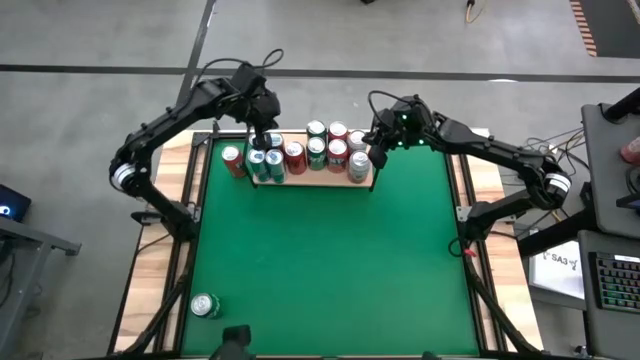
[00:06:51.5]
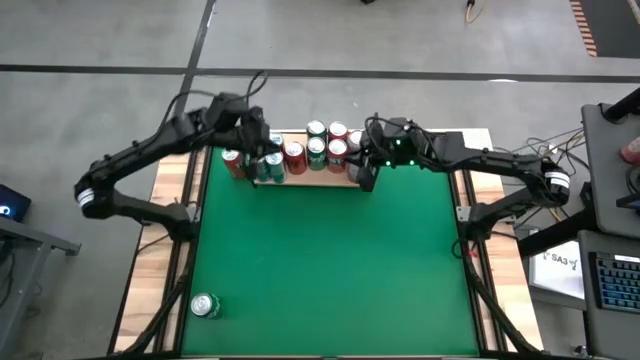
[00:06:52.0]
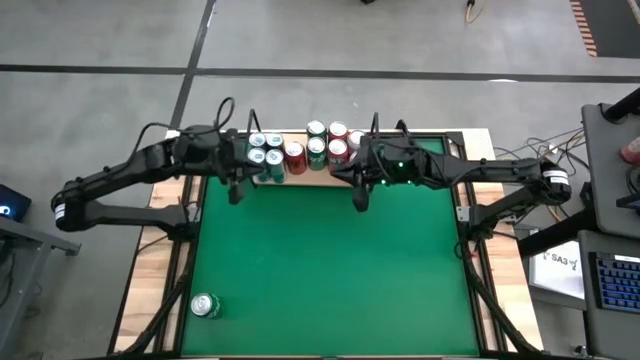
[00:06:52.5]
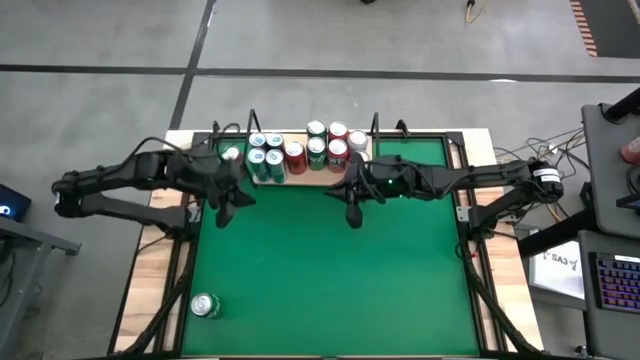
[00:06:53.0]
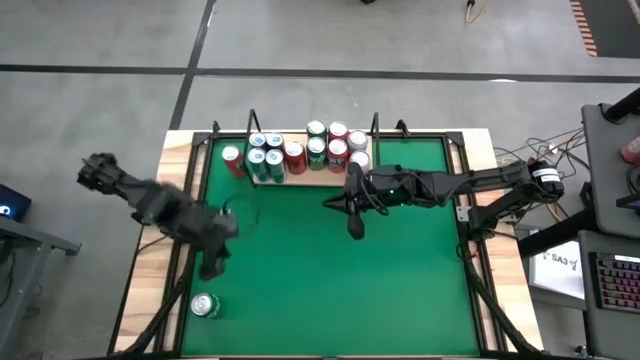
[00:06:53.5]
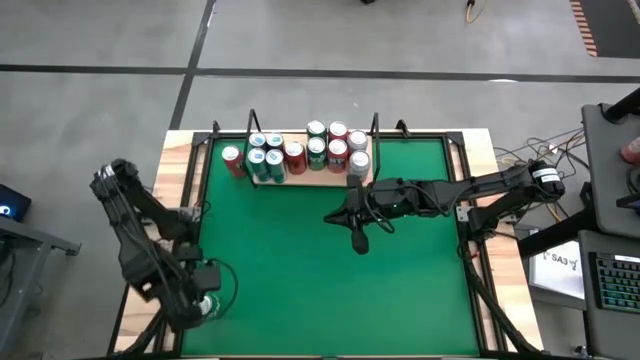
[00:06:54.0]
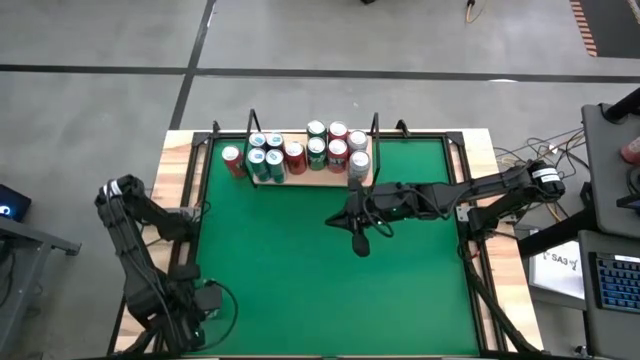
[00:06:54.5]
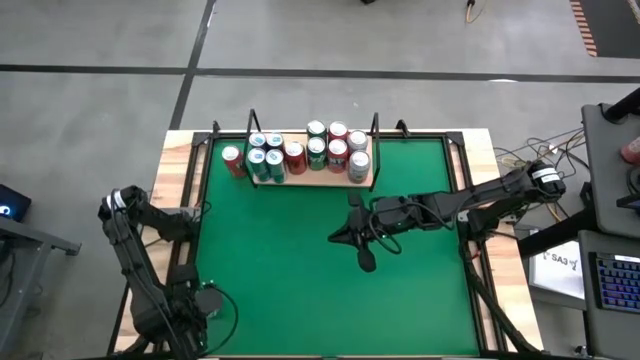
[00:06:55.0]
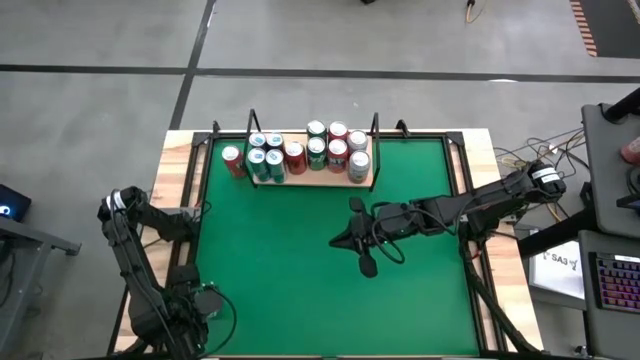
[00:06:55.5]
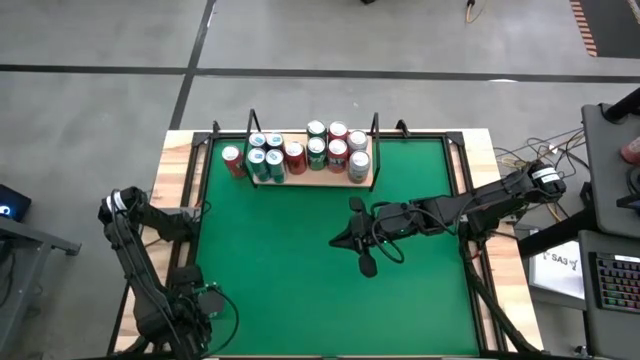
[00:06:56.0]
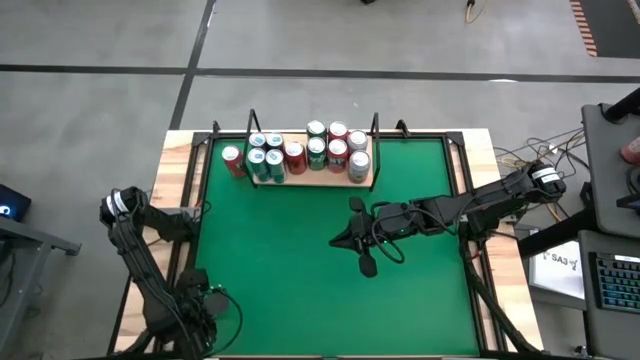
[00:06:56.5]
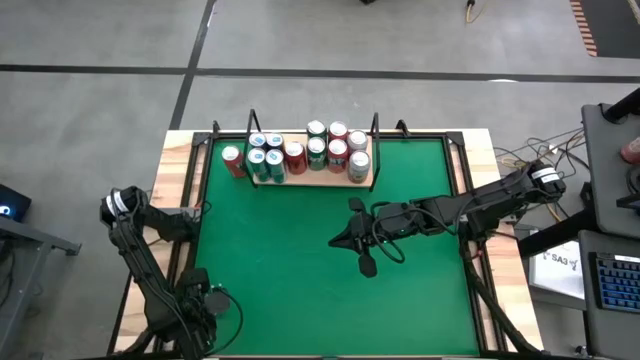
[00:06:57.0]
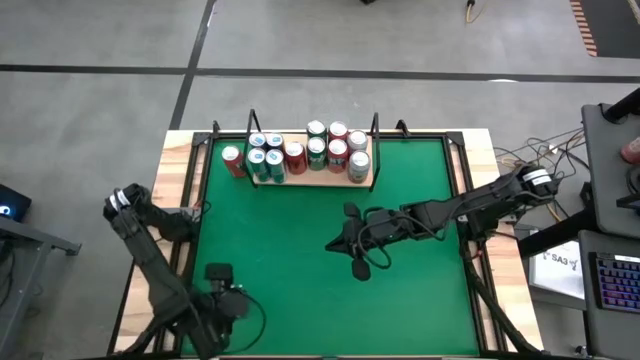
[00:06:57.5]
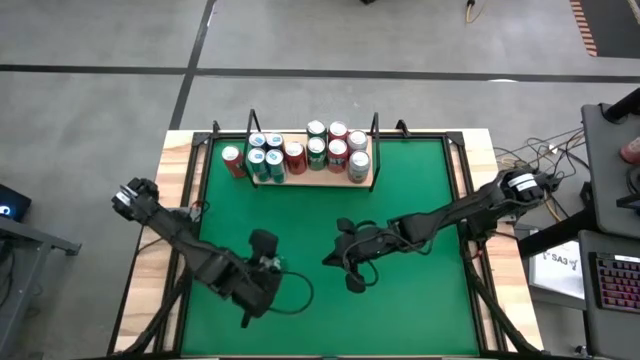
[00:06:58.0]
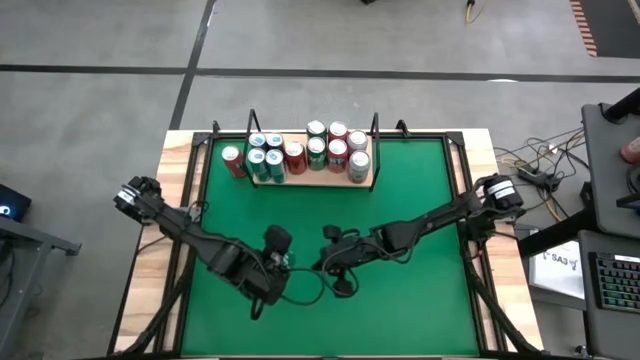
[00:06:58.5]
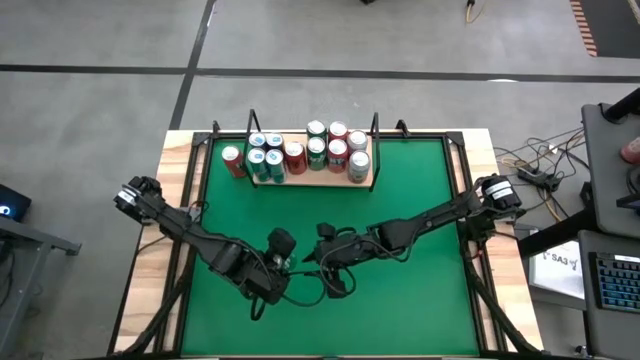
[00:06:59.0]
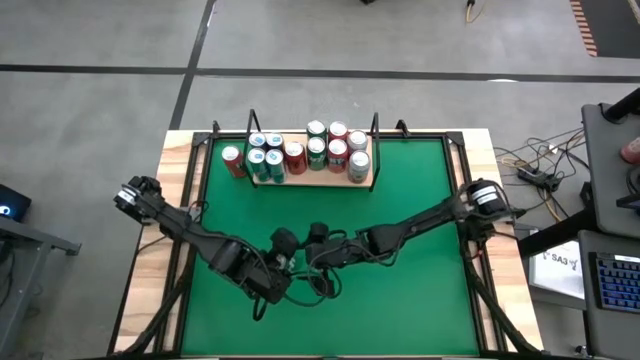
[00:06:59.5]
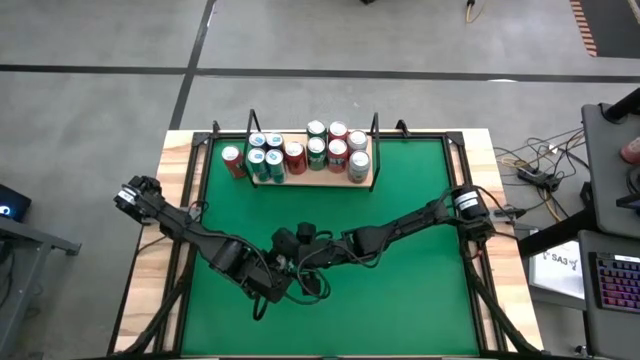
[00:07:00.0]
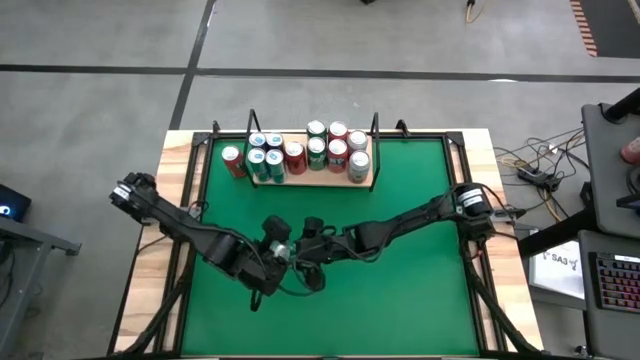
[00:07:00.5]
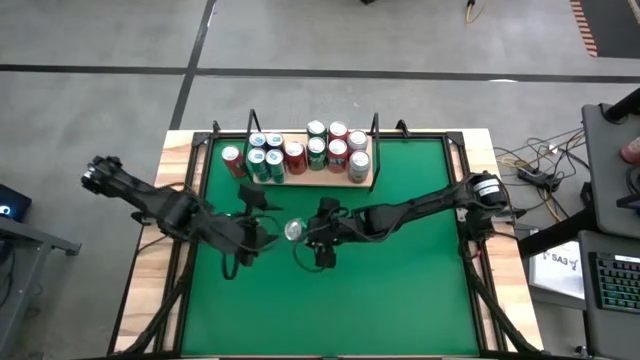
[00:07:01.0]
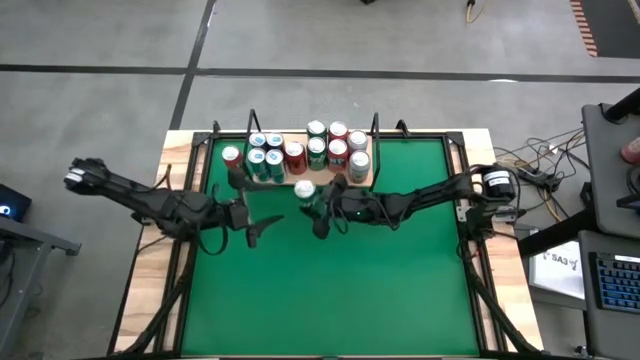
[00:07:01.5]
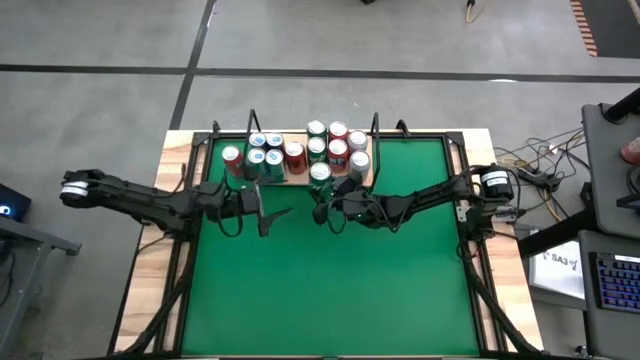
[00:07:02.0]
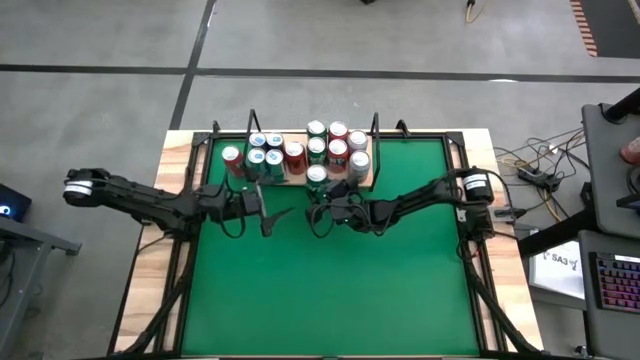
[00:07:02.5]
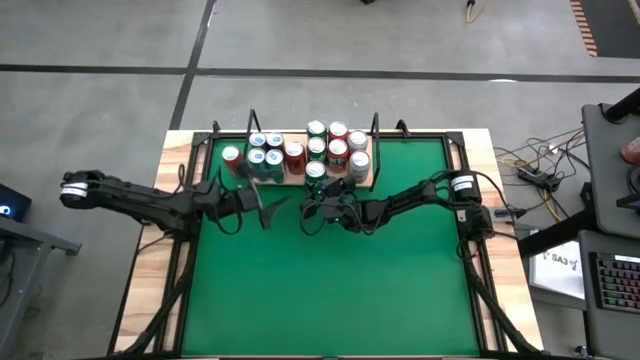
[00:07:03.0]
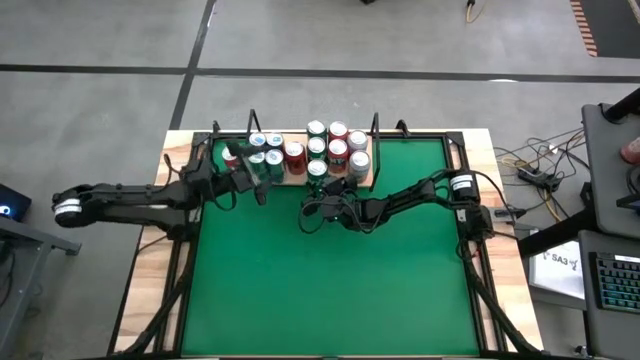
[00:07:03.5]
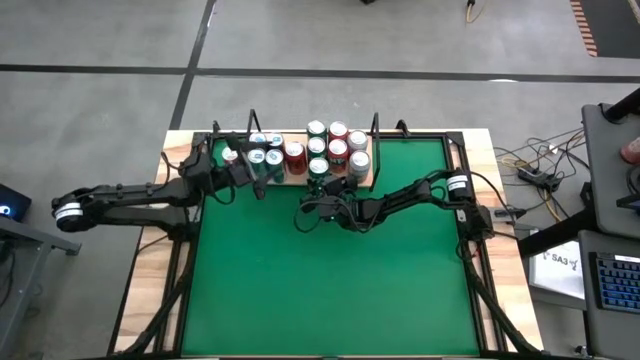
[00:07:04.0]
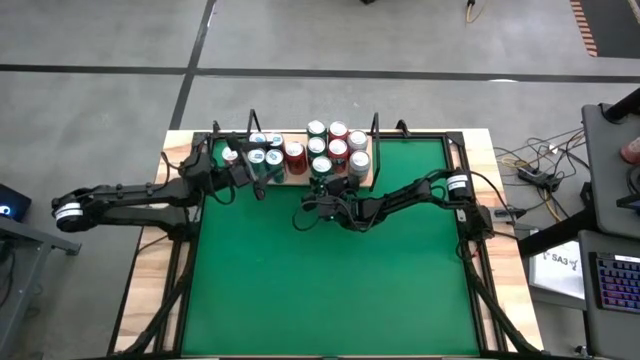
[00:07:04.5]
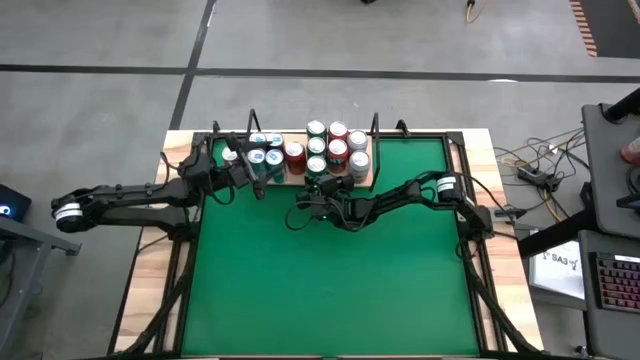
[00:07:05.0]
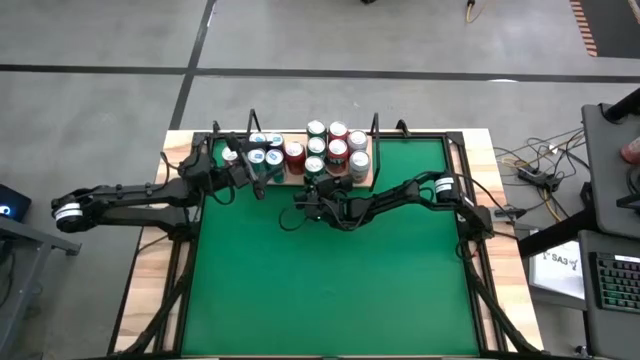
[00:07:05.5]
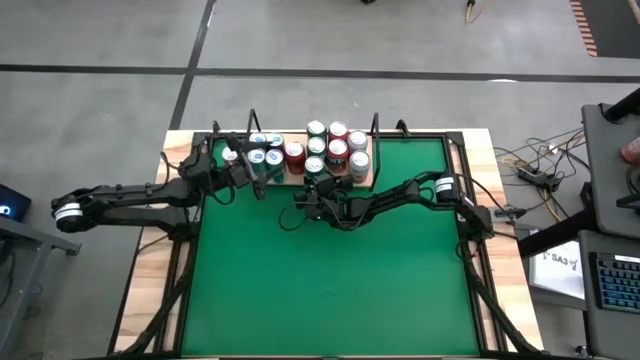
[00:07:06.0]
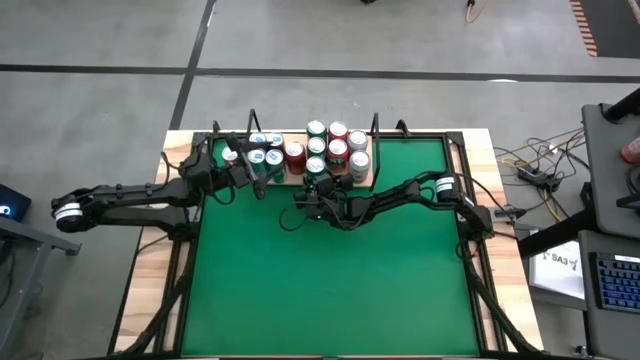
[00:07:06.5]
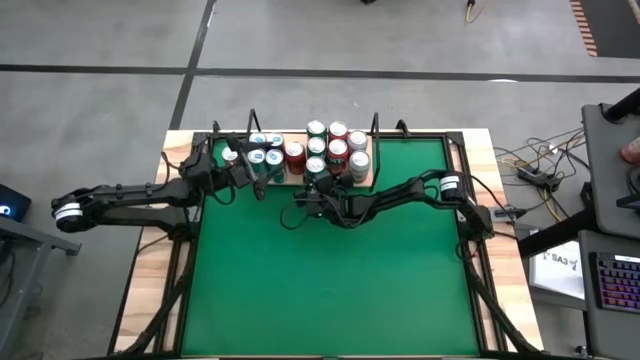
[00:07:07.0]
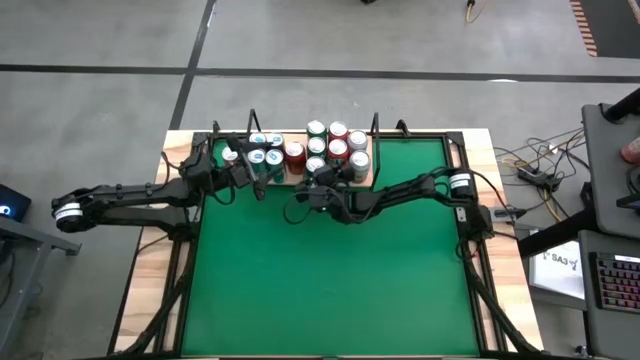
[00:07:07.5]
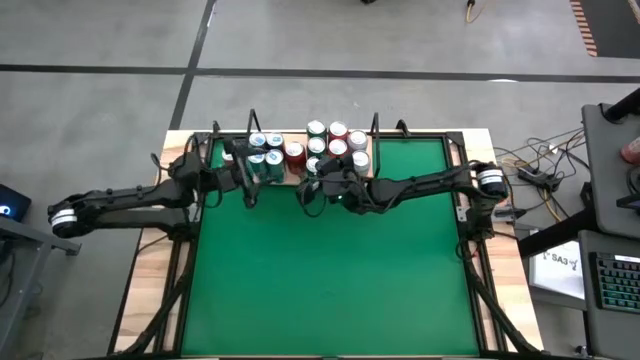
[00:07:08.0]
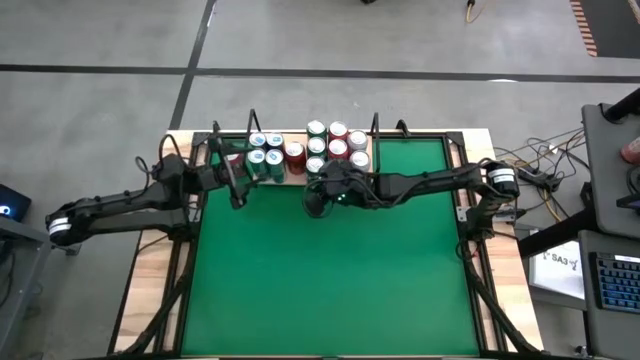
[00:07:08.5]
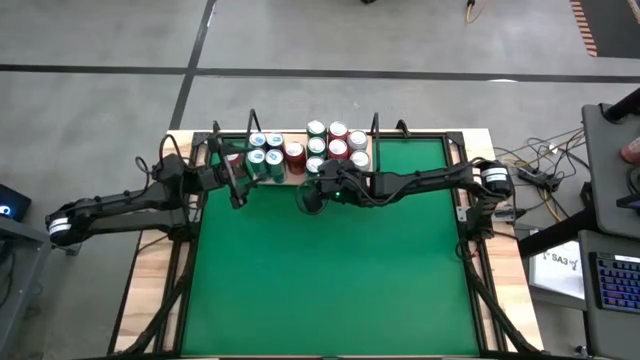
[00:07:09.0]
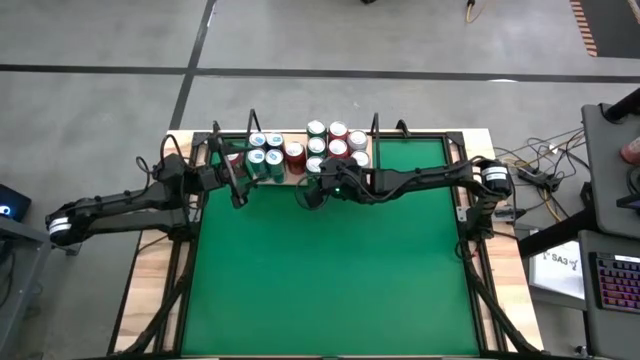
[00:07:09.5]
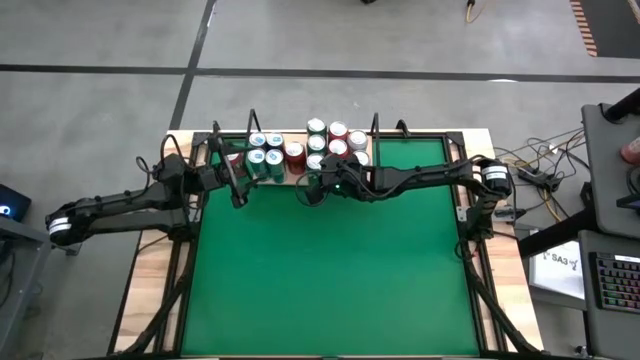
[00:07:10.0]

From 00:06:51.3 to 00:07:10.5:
Task: Pick and place cans onto a shelf
Put the green soda can on the shelf aligned with the other green soda can

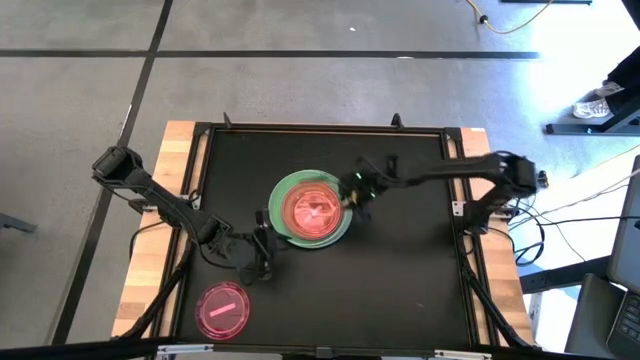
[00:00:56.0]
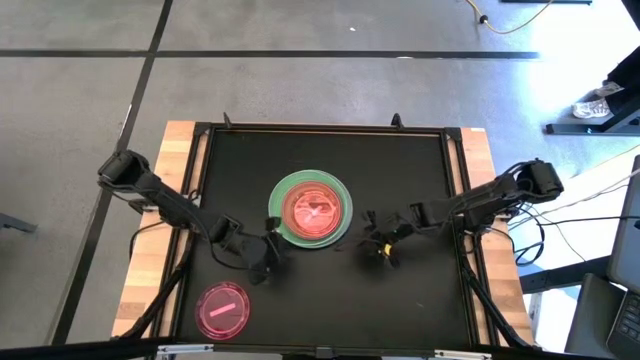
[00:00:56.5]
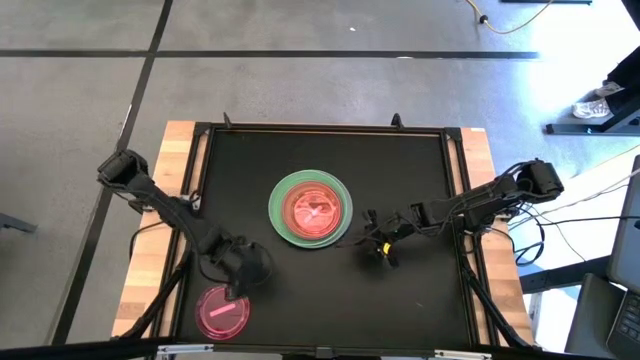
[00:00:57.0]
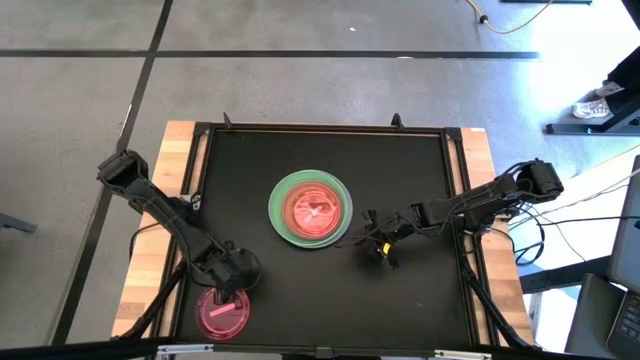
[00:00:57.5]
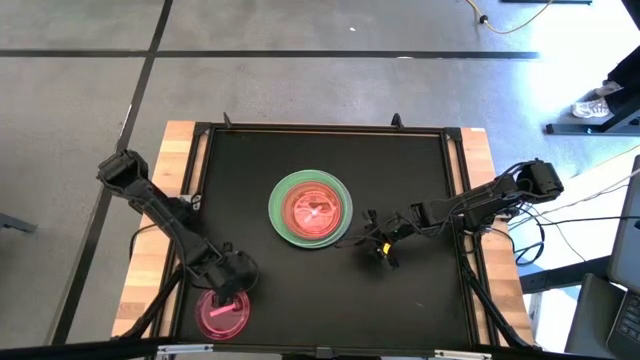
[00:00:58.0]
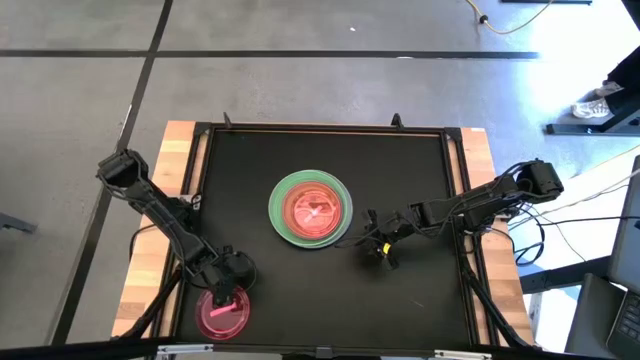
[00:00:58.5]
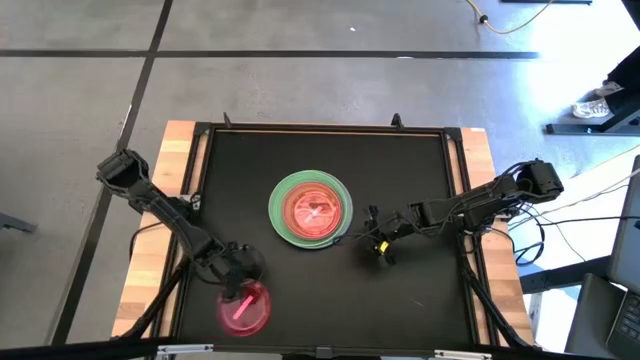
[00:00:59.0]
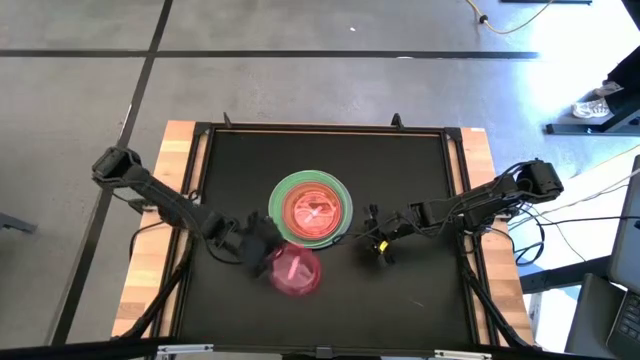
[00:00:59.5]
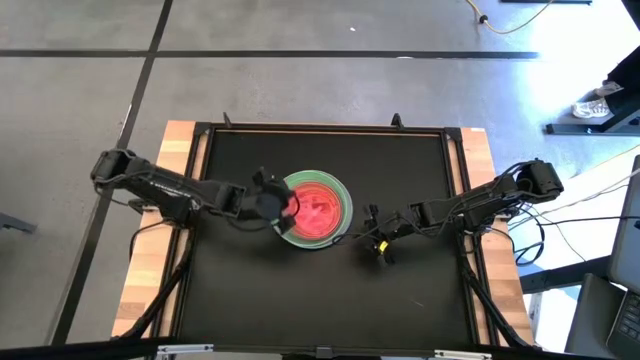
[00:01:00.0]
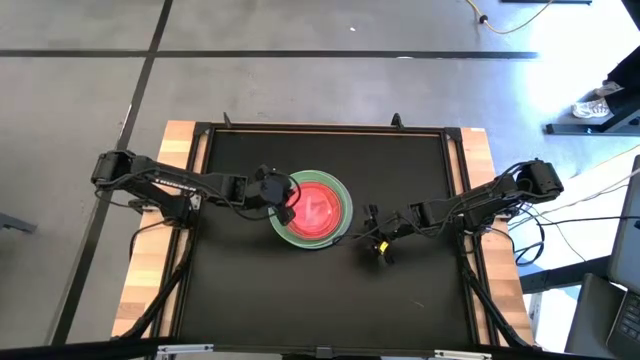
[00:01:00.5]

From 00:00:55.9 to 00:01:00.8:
Task: Stack plastic plates
Stack the red plate on the red plate
